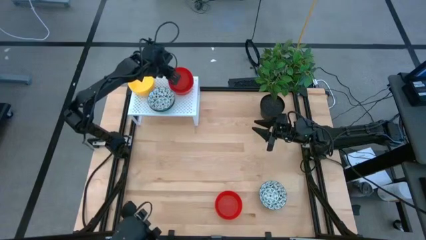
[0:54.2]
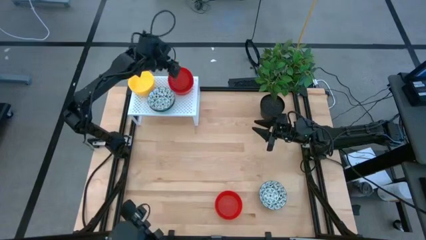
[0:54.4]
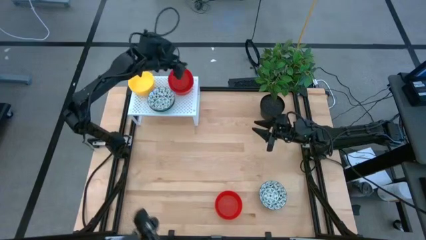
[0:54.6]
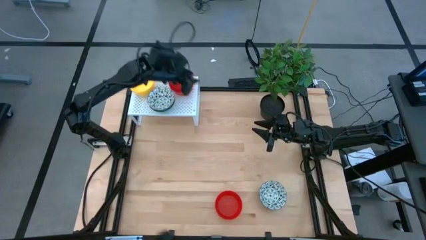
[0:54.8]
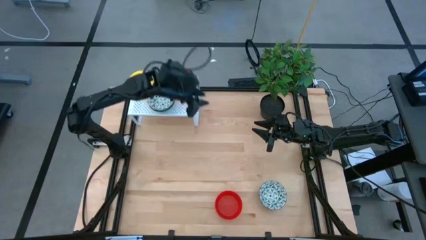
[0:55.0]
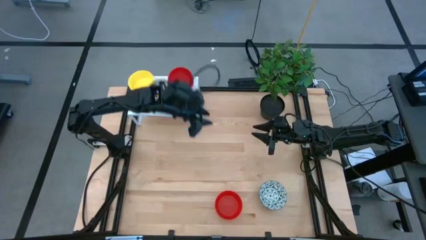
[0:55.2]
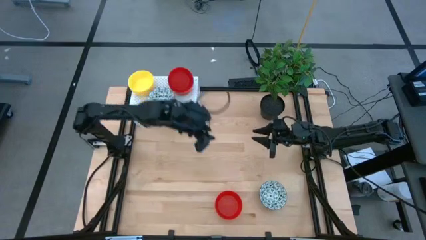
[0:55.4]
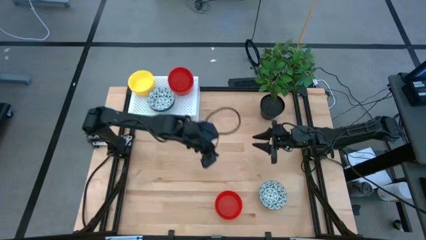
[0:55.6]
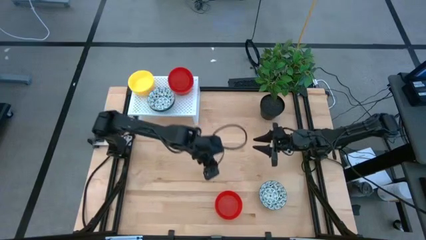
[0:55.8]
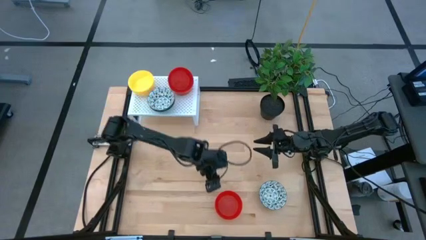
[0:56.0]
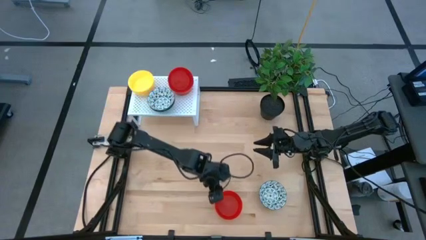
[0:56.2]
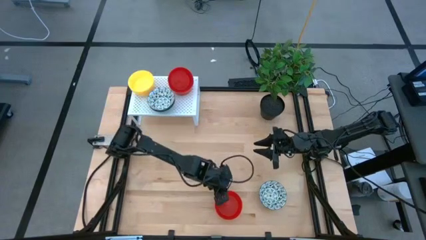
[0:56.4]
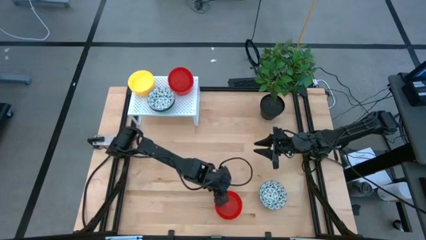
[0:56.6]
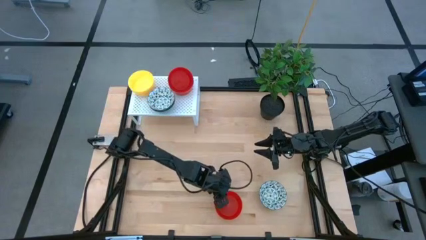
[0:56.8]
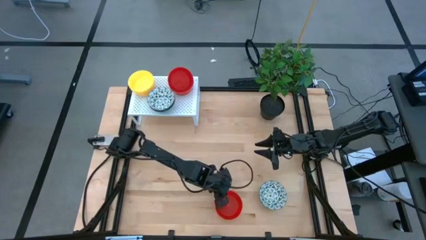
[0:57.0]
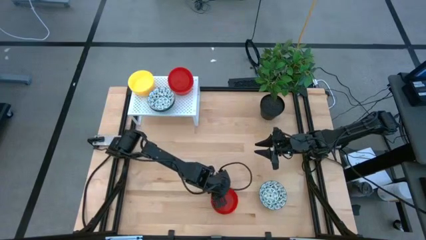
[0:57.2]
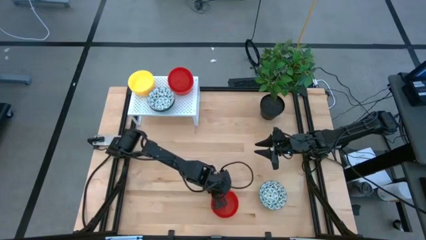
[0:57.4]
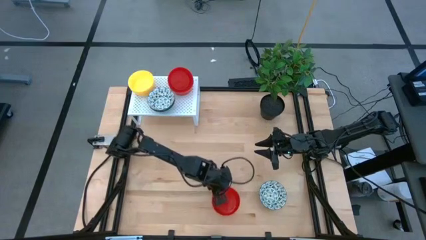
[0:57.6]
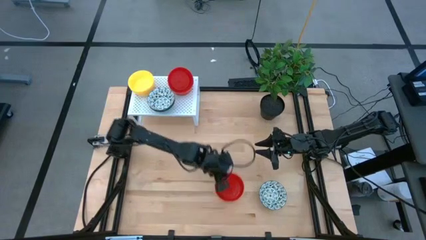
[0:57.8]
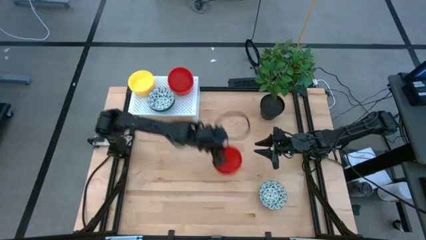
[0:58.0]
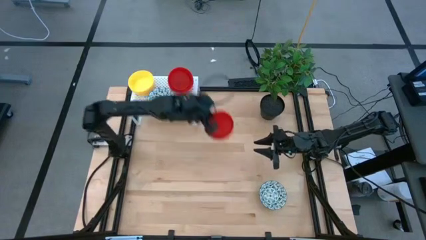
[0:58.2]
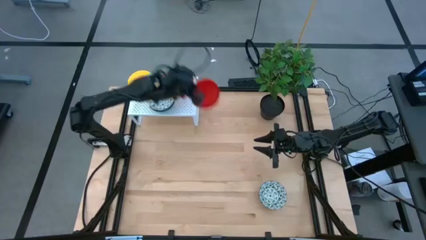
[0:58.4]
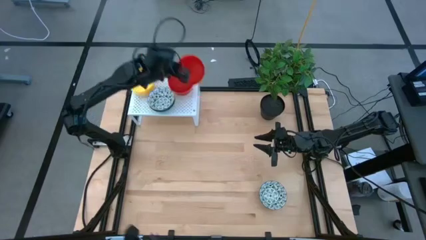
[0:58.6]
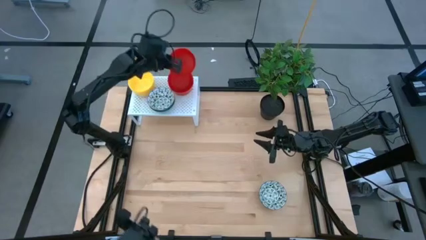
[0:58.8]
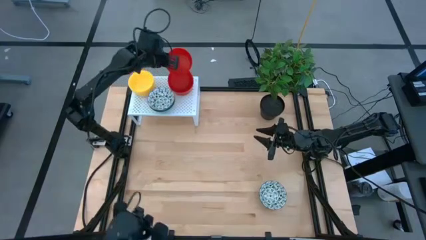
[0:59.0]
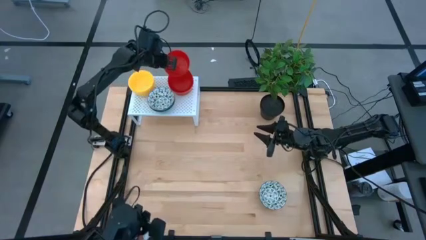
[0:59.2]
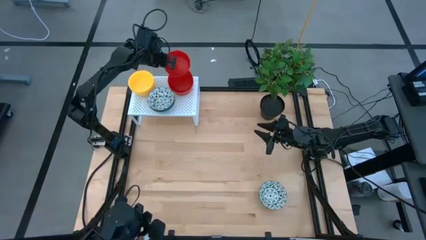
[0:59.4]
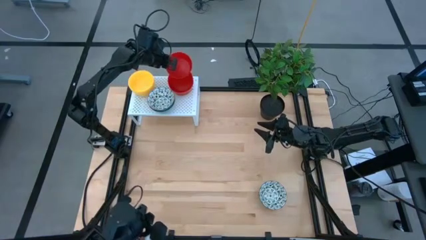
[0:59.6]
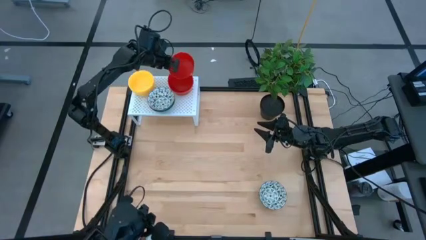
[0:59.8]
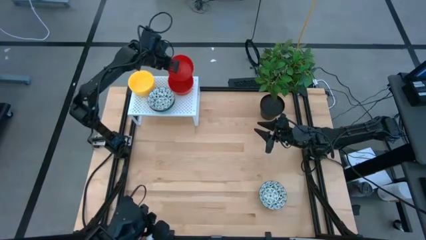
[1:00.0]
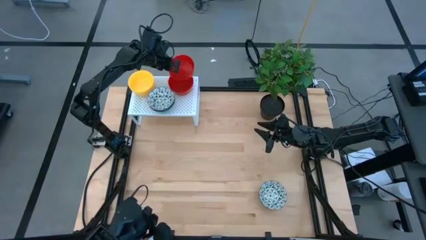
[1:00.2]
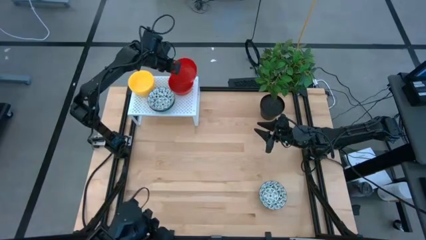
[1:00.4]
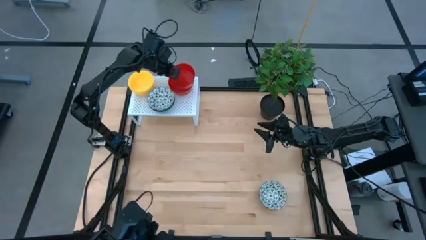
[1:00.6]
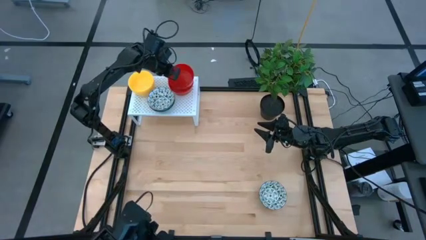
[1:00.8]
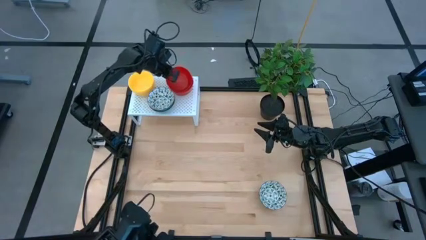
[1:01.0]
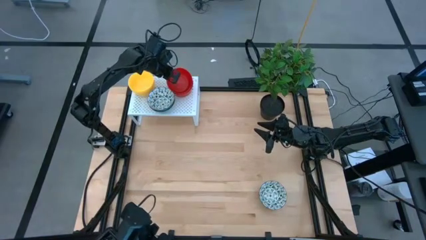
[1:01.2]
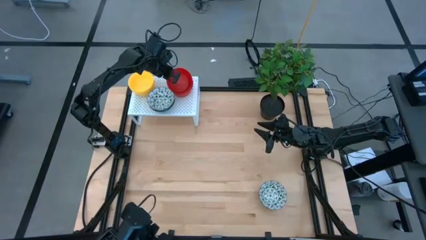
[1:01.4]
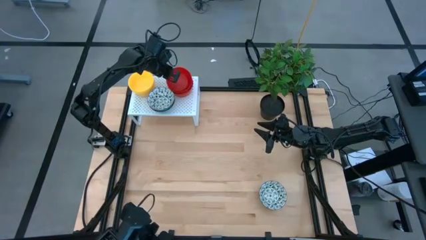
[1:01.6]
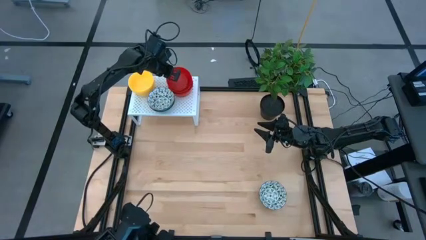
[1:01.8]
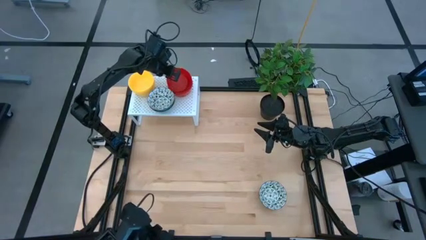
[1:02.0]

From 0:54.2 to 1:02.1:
Task: Pick & Place Mini bowls
Stack the red bowl on top of the red bowls on the shelf

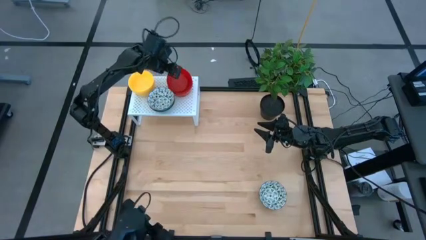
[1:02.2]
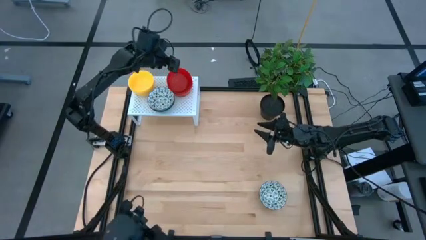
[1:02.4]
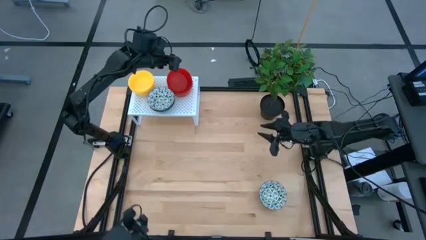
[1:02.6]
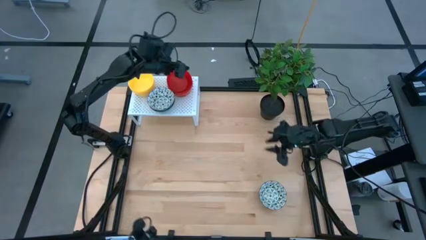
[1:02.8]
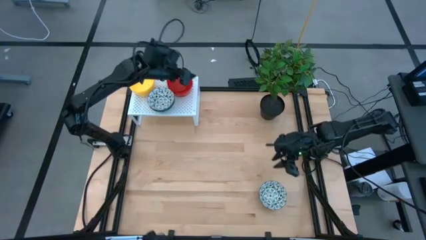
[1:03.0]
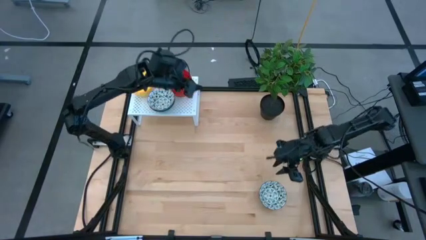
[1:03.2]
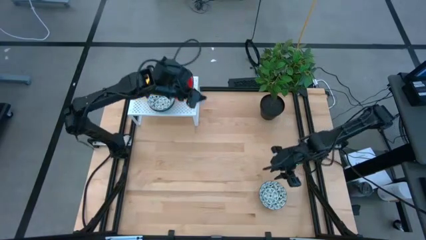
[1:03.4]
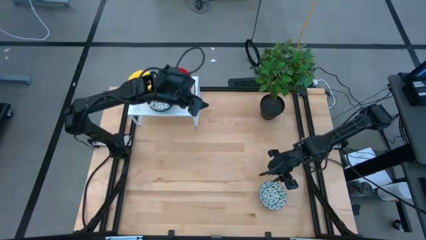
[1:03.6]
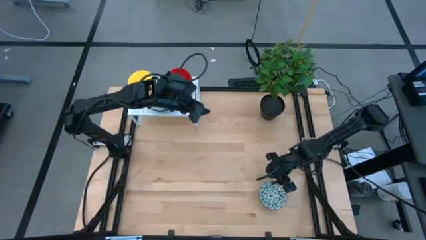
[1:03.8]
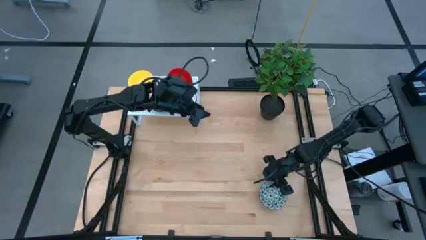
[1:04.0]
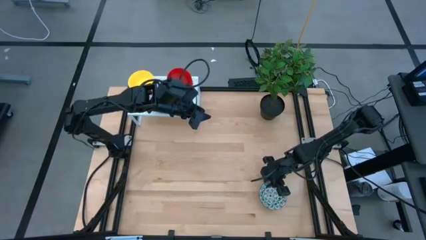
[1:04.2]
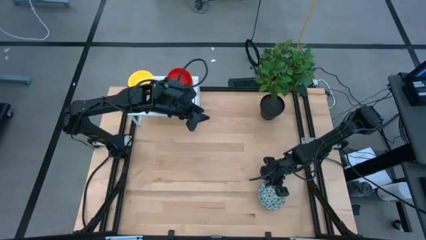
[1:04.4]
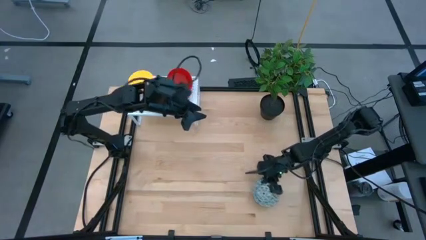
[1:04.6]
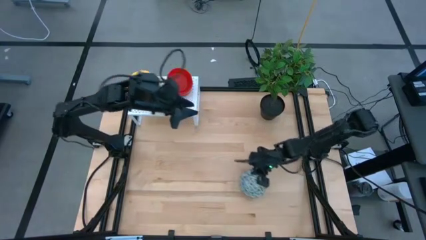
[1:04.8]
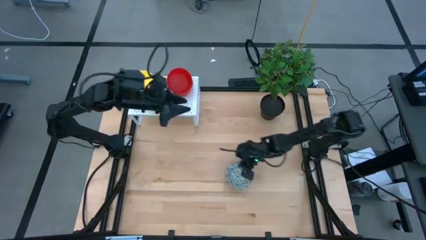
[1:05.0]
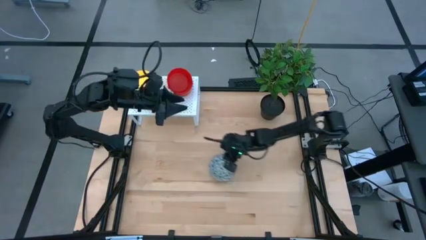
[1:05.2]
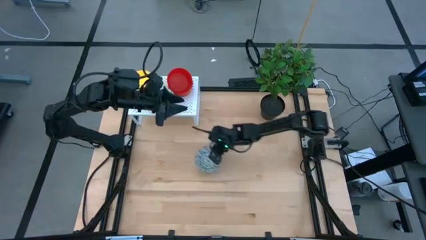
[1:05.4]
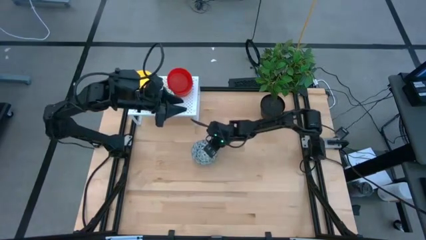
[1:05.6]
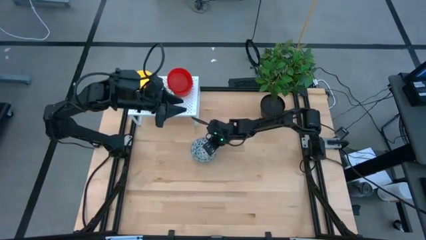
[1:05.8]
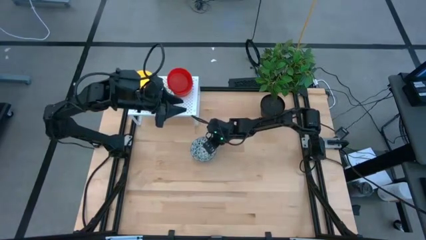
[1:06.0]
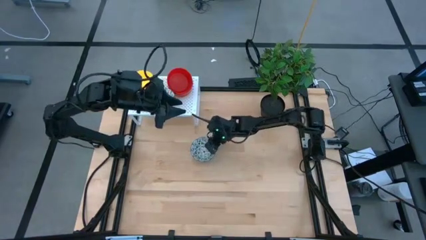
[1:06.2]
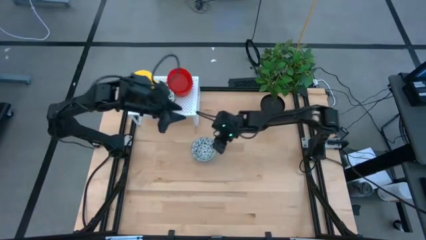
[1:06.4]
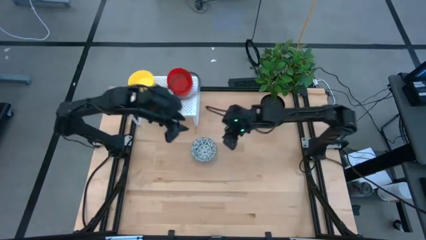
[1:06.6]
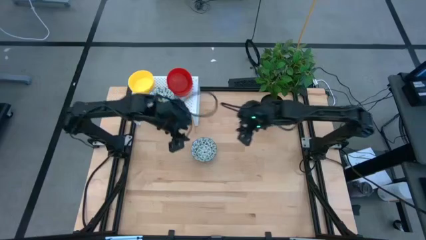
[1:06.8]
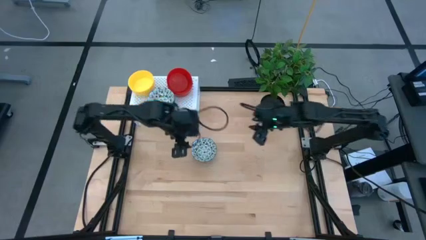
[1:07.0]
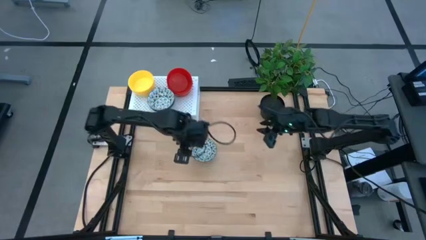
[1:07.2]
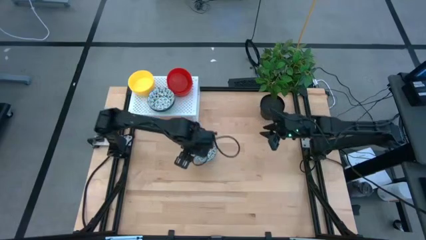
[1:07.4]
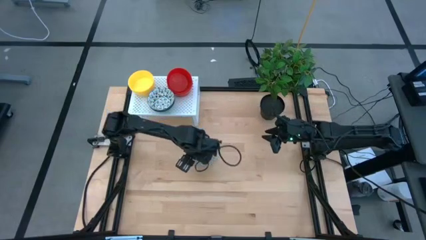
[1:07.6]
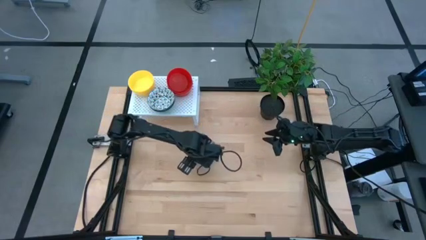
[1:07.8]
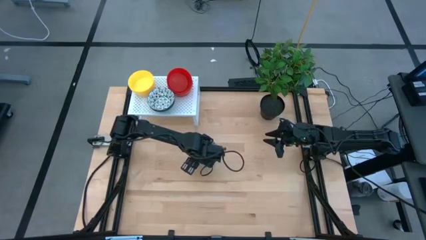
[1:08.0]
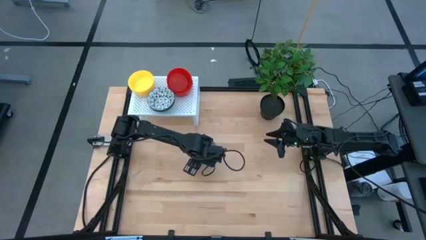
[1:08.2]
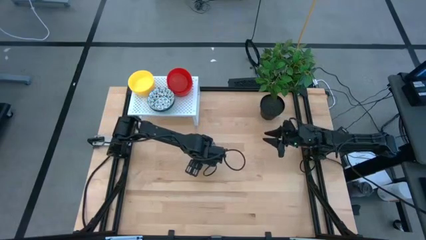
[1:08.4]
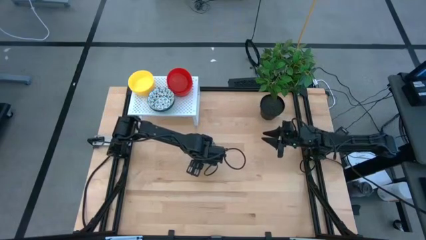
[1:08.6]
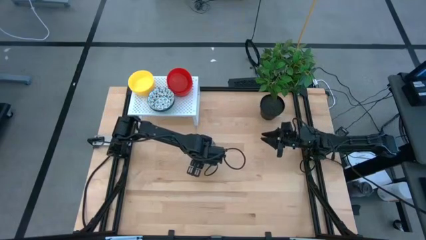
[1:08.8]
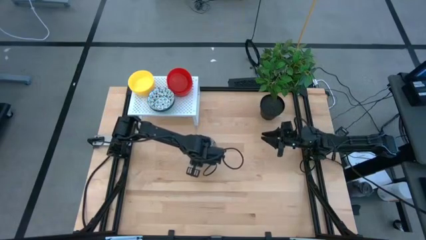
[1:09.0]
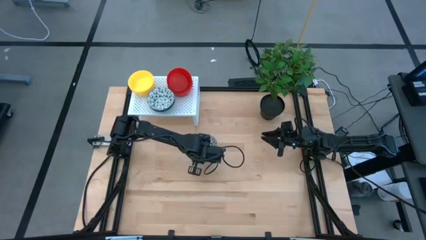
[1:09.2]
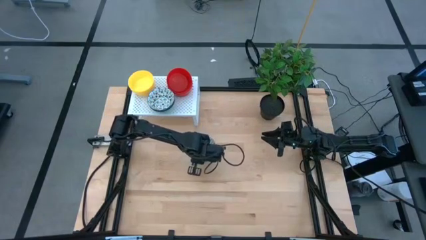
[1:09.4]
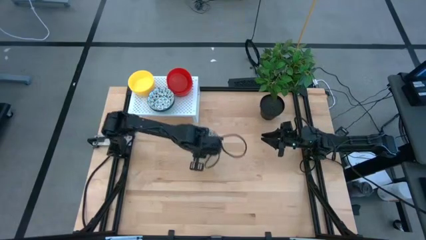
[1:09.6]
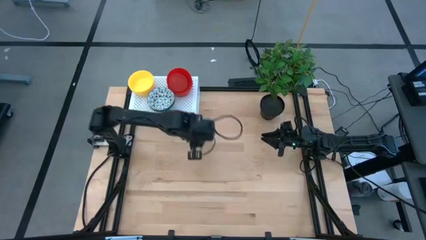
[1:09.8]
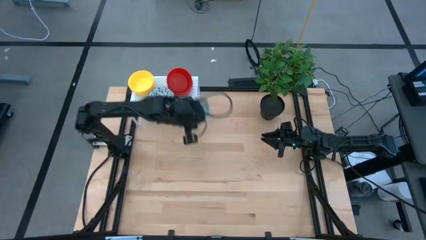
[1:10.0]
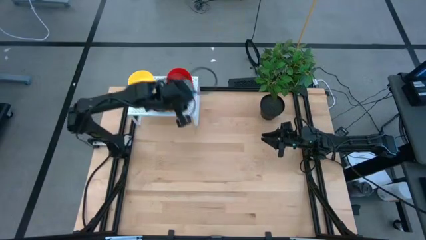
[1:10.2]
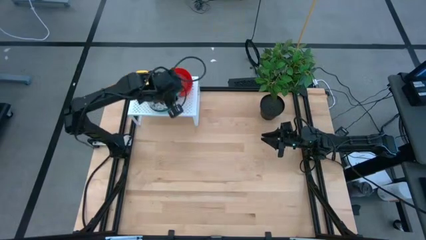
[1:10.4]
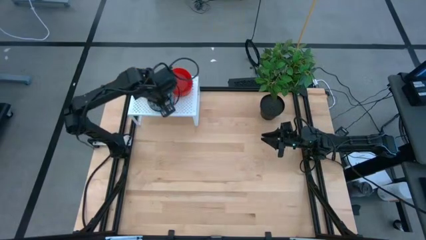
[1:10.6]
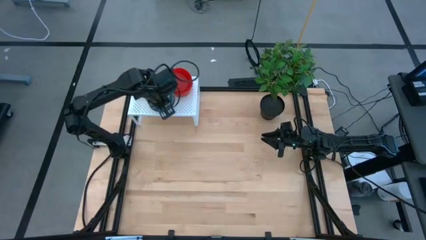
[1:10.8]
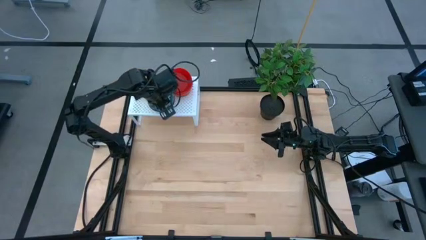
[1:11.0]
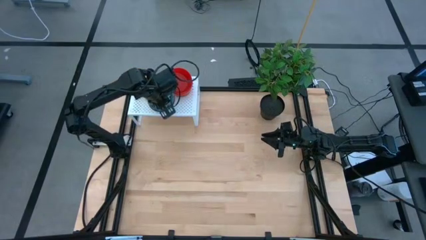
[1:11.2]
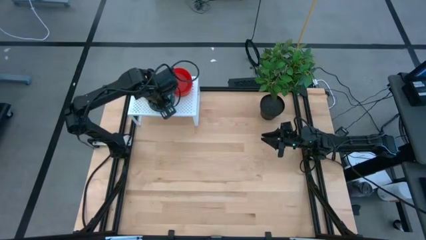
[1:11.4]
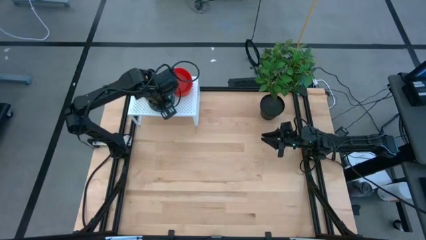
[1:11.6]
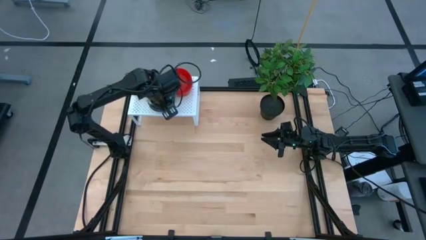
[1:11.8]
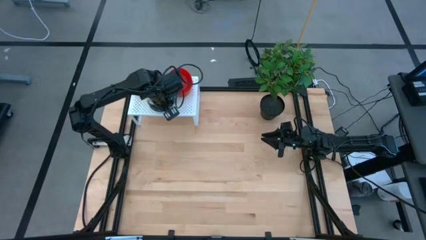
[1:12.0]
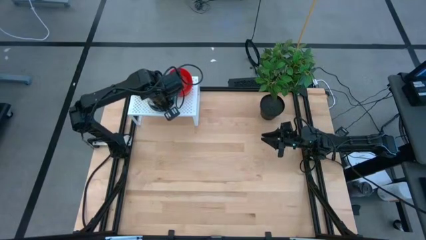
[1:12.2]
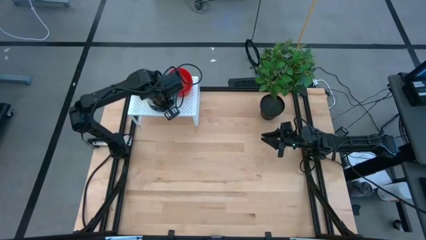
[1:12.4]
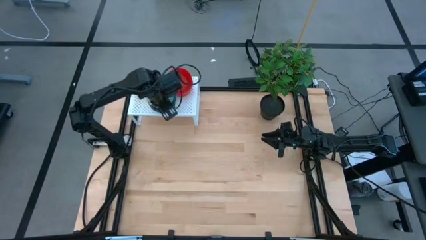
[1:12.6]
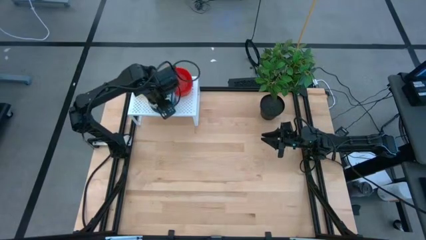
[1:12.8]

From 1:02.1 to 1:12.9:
Stack the green patterned bowl on top of the green patterned bowls on the shelf
